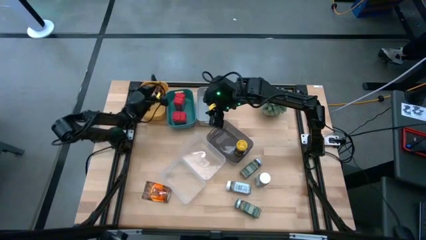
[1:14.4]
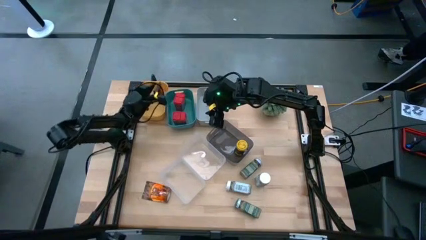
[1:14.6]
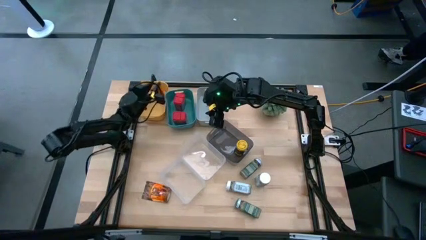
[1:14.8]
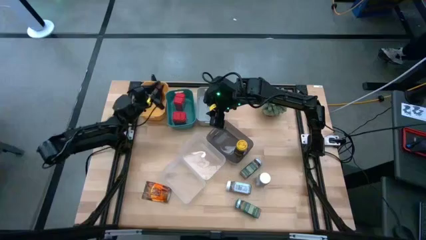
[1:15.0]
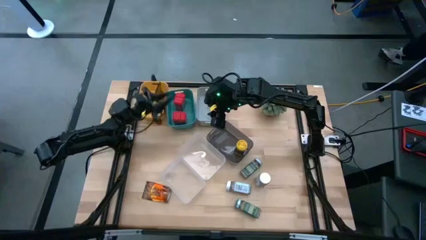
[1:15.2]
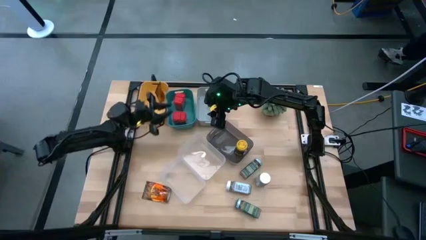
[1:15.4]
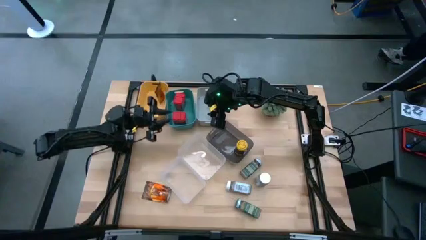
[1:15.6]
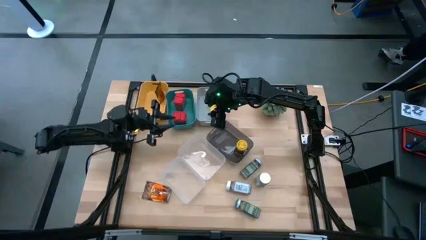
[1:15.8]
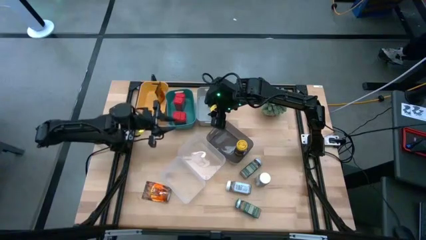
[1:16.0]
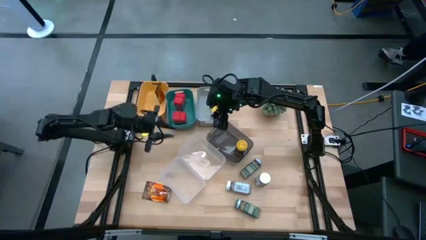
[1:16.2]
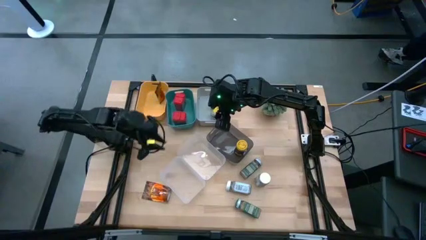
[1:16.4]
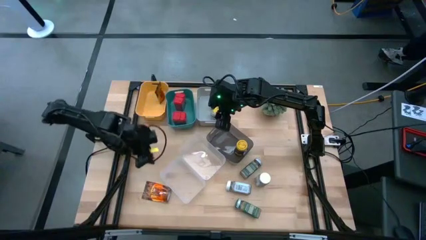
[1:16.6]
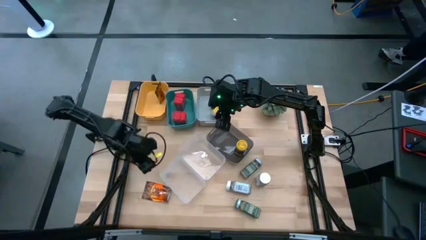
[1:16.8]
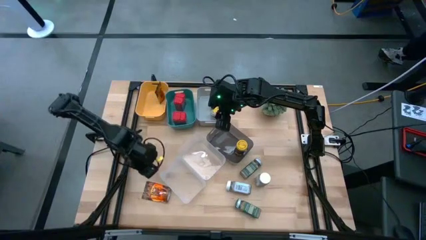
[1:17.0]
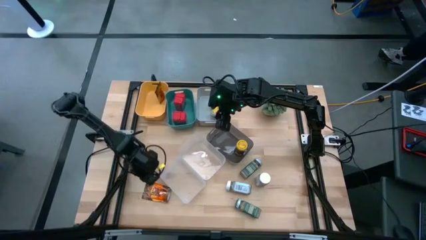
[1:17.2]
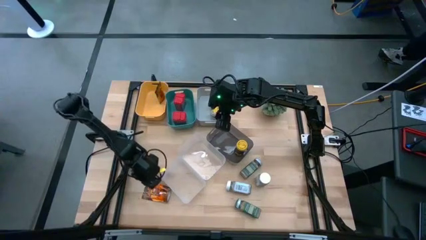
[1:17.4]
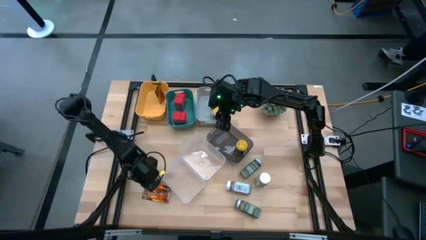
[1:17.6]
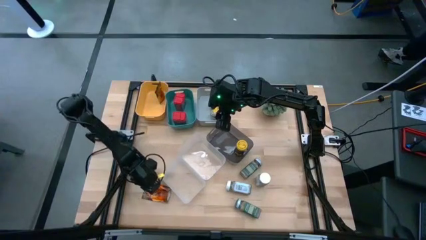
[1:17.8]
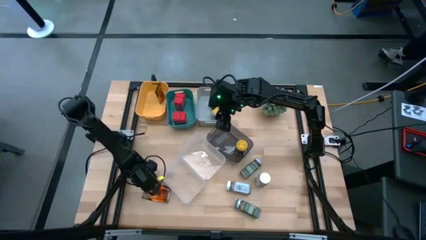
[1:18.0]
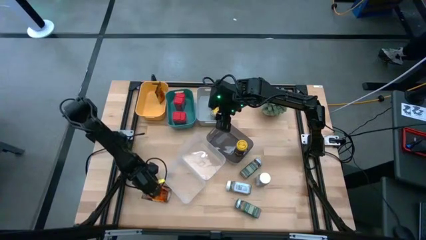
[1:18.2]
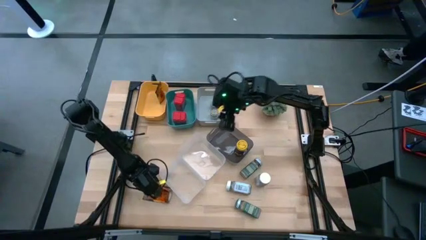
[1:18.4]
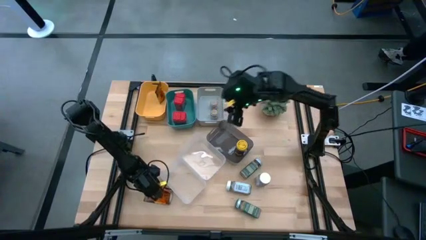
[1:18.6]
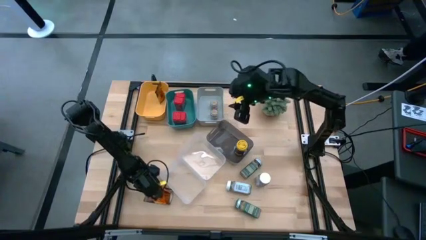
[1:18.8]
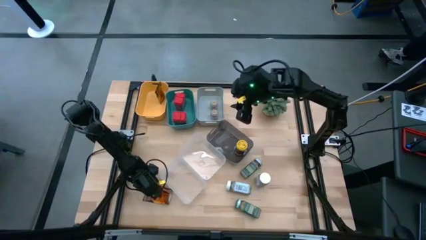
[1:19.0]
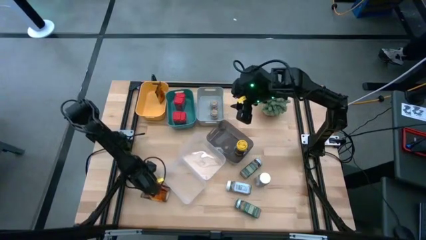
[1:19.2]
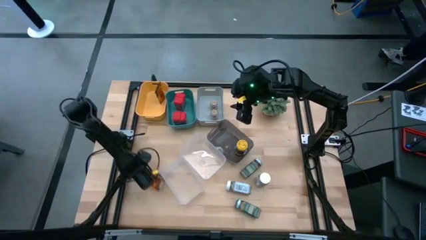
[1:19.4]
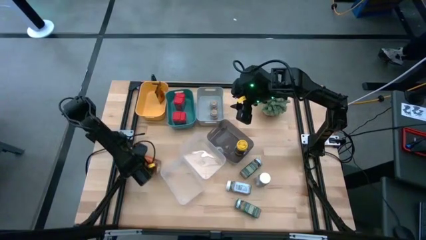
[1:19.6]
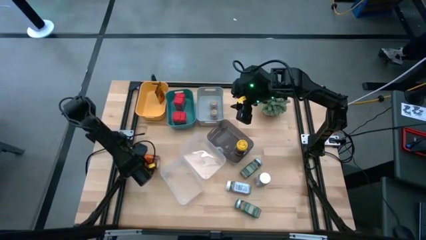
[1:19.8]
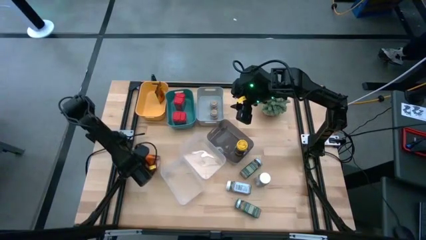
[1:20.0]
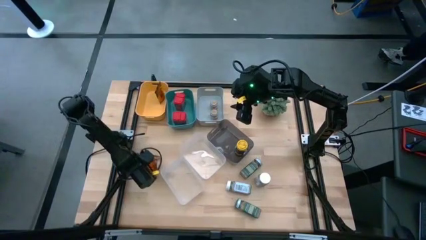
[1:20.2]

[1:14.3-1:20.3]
Task: Sort spices by type
Put the orange seasoning pack into the yellow bin

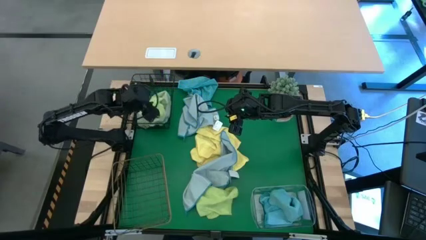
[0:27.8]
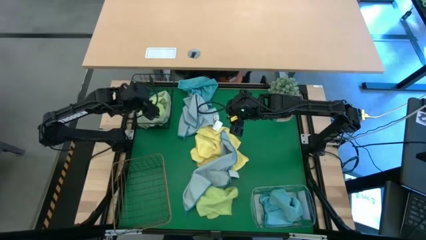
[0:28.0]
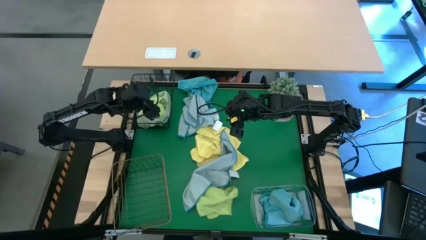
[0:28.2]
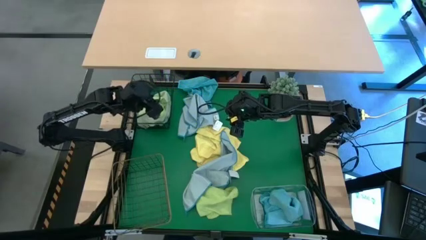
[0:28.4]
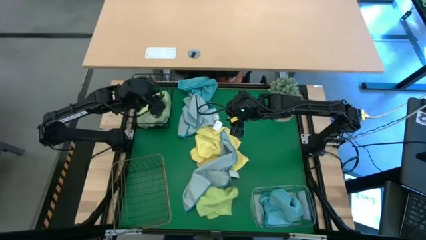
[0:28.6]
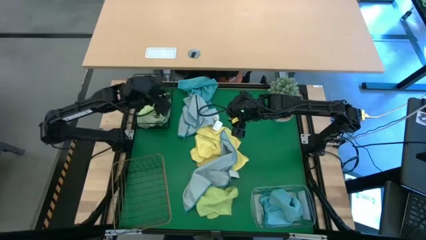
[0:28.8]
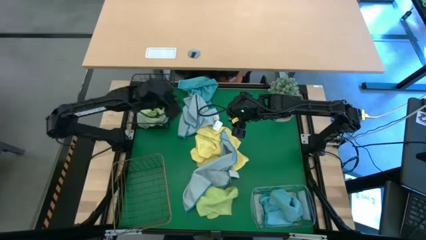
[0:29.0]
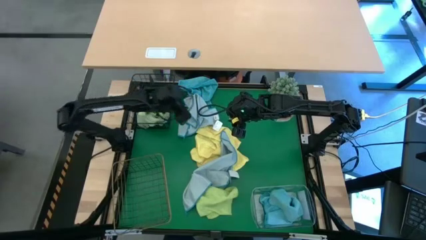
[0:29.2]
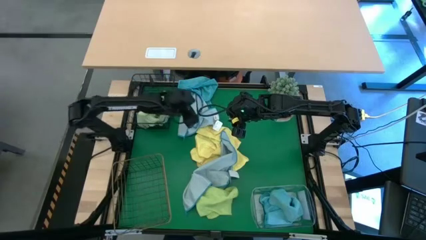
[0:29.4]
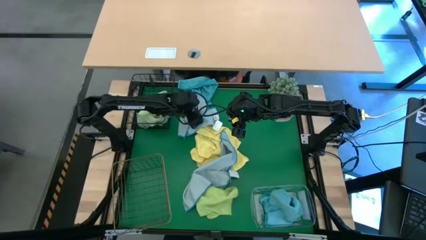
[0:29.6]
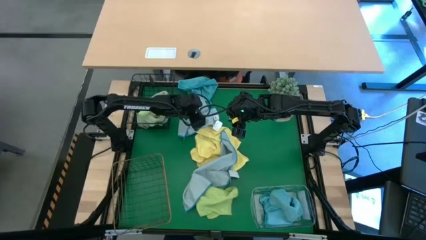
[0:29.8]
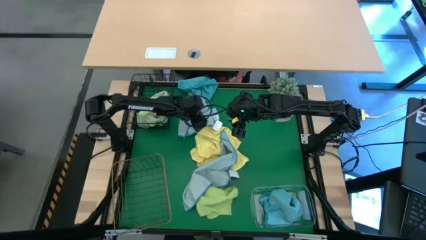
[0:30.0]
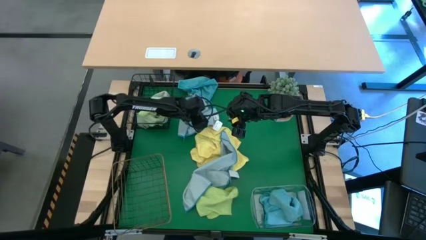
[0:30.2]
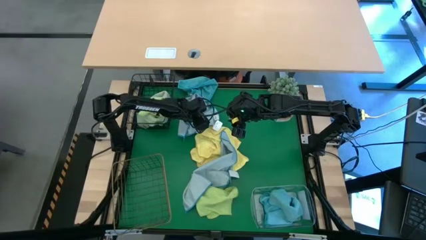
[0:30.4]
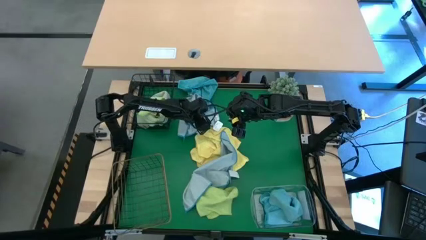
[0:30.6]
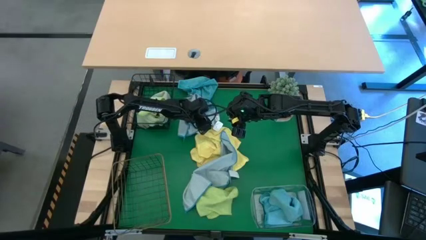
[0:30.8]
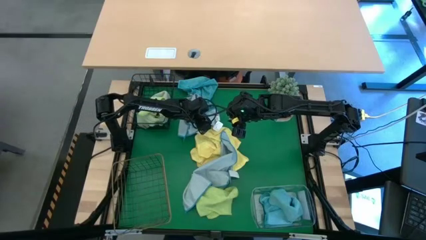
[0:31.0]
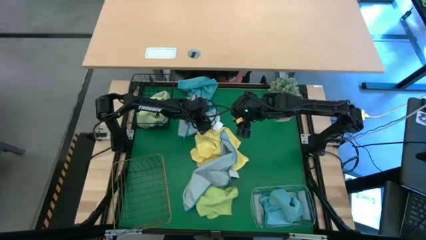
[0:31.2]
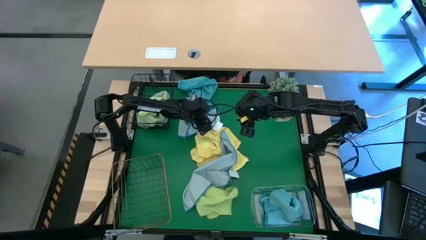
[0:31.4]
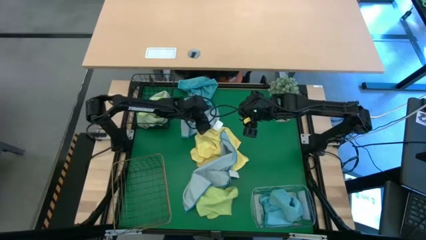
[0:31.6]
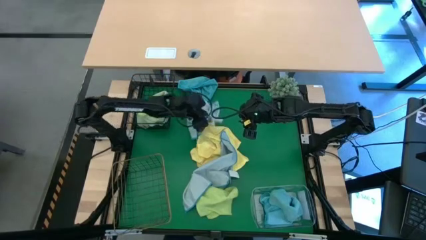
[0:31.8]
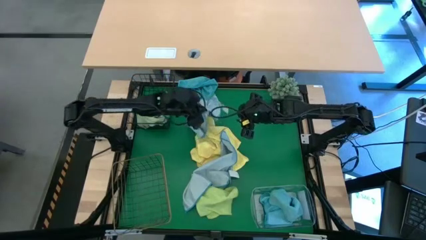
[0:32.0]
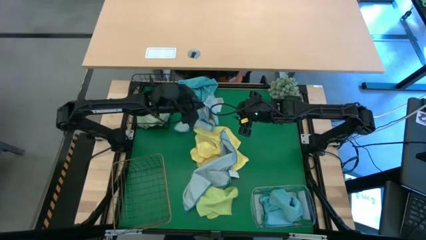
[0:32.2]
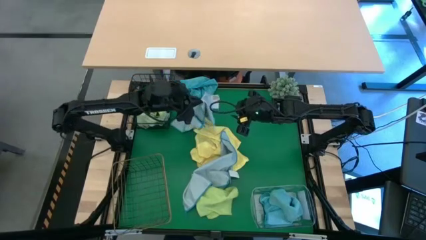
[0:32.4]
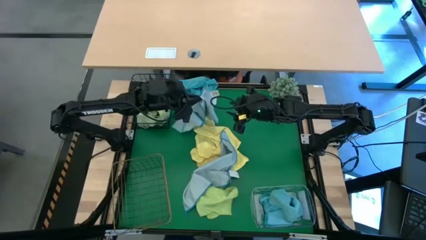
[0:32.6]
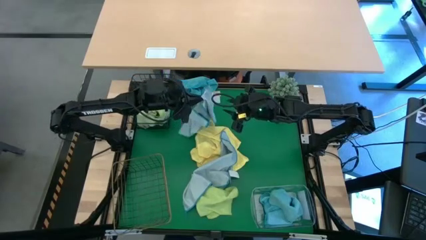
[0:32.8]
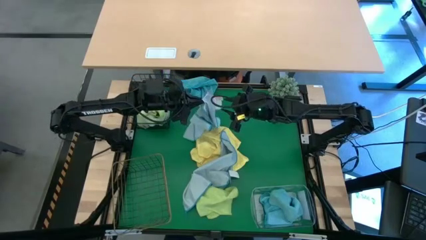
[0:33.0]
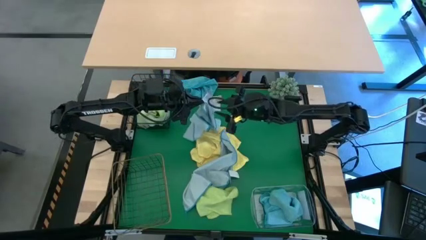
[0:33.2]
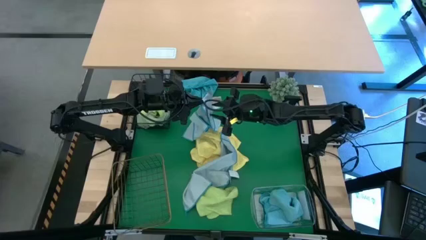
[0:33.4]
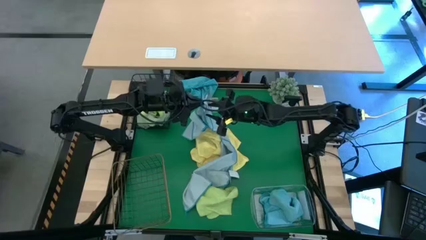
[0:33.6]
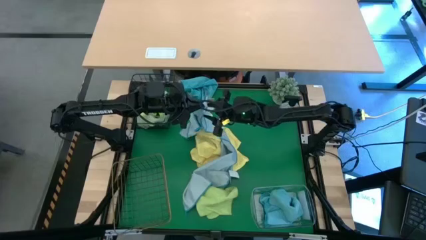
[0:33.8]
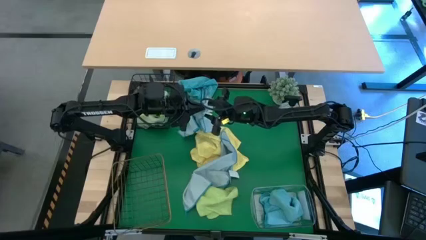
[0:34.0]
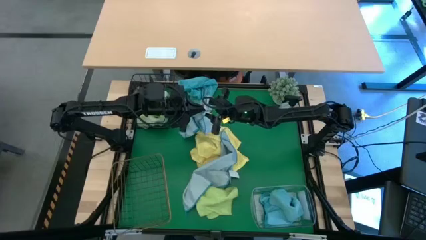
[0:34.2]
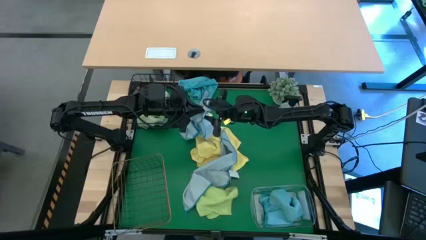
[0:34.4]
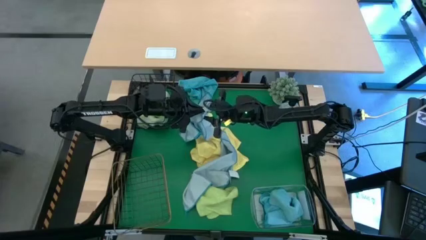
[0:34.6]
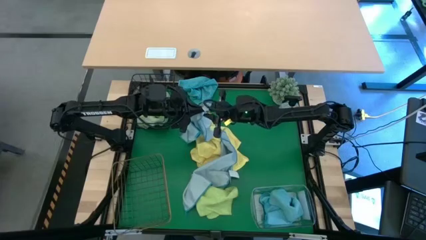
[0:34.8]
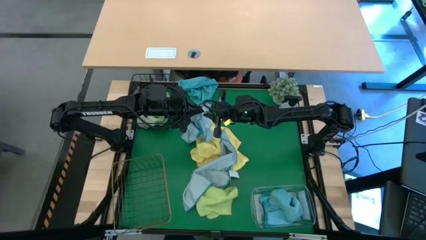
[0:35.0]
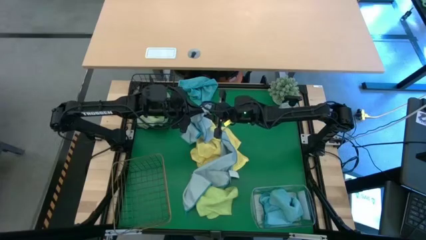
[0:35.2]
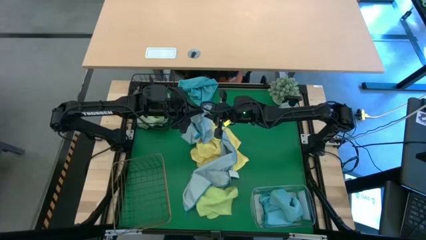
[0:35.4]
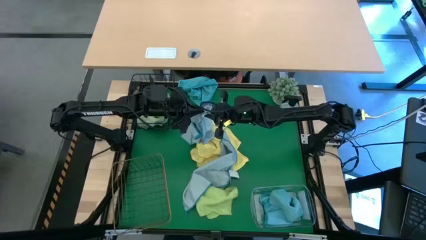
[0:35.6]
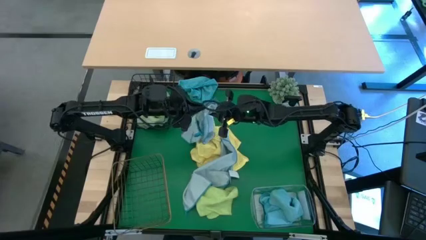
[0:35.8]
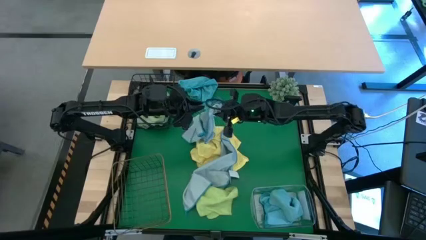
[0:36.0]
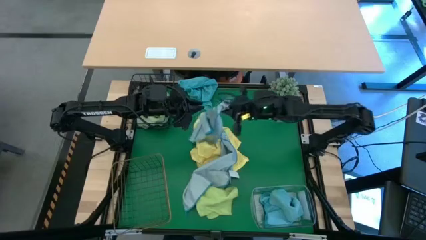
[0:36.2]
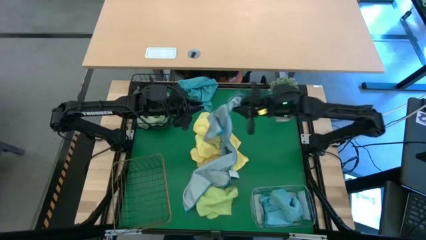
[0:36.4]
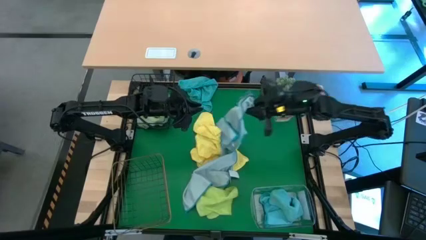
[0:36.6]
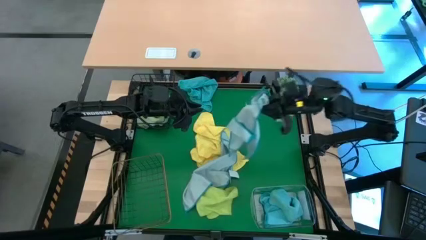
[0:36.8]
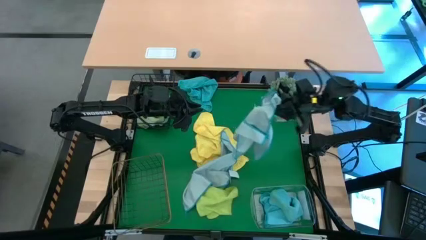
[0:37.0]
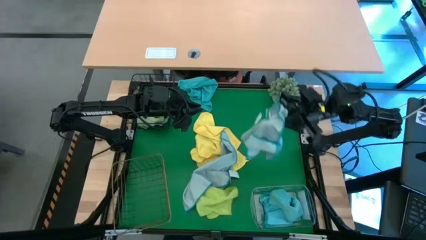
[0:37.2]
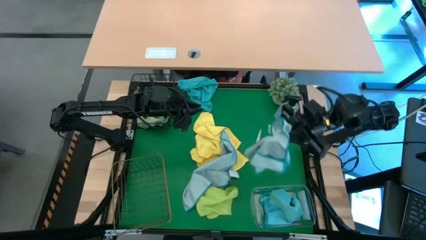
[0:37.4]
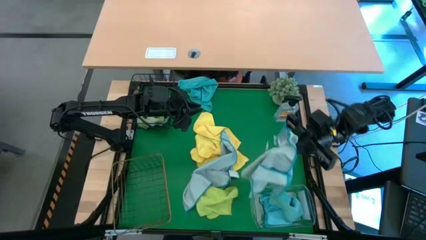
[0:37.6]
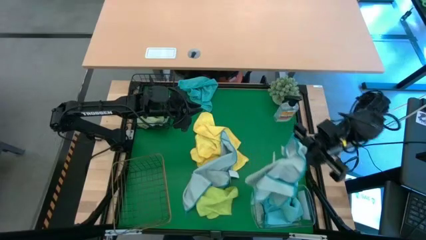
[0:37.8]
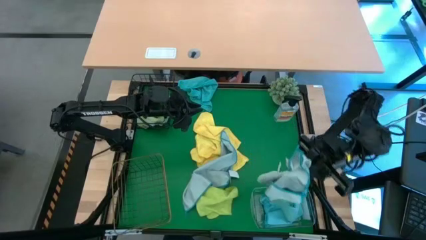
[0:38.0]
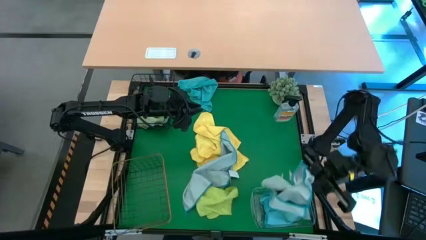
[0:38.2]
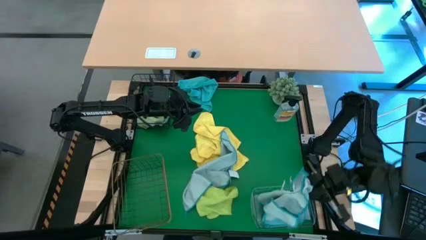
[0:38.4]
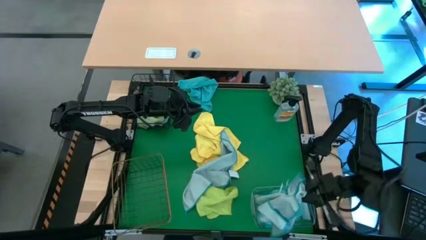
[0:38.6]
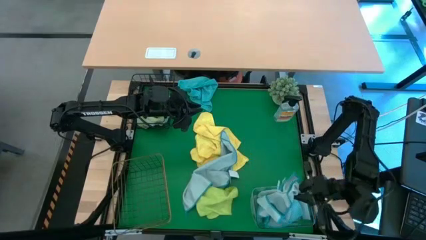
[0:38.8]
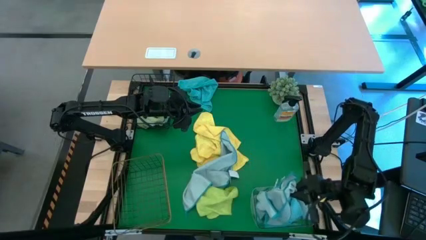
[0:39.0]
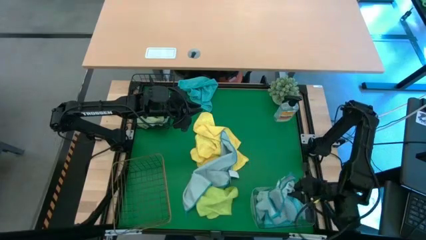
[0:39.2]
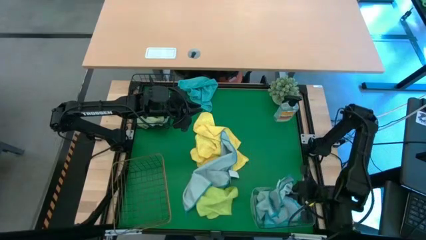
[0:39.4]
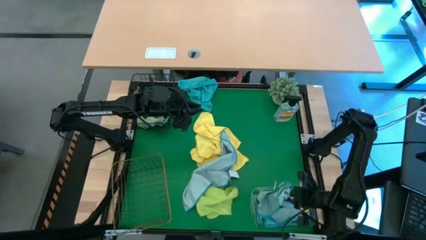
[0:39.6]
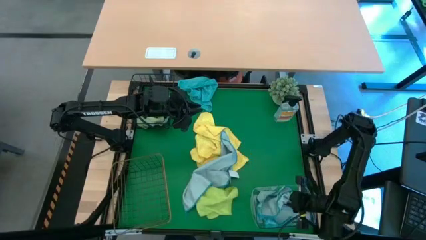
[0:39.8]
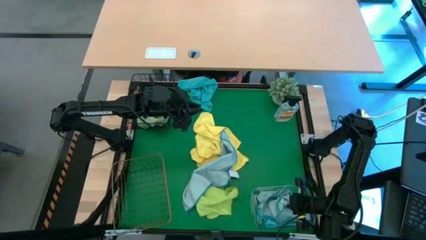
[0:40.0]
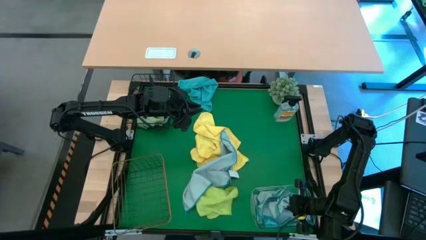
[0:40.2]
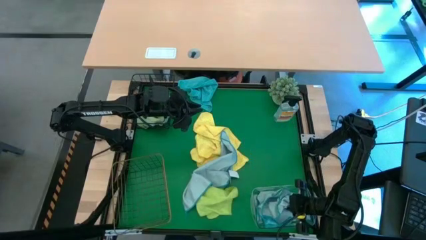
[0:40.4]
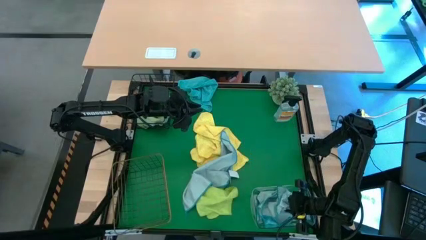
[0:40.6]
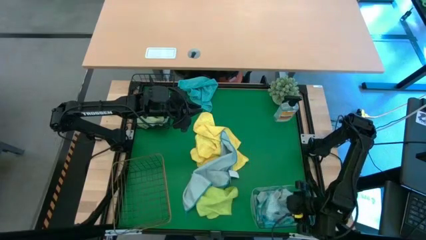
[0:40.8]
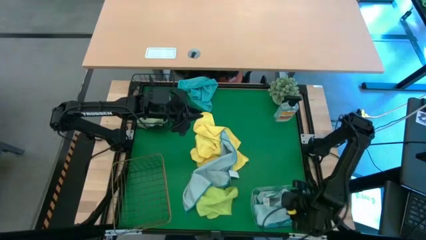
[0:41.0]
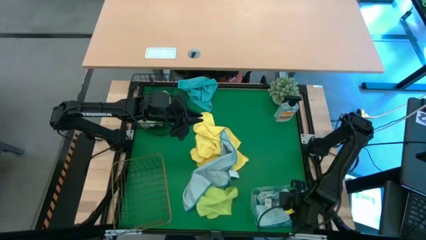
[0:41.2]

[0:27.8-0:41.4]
Task: Sort microfiber towel by color & place in baskets
Put the top light blue microfiber cloth into the transparent bin
